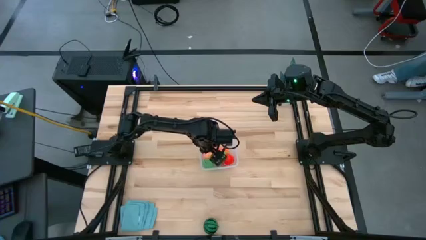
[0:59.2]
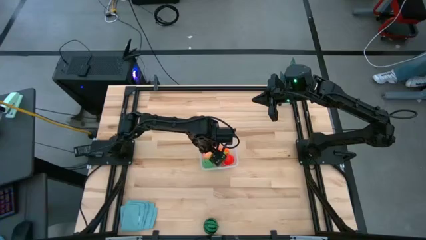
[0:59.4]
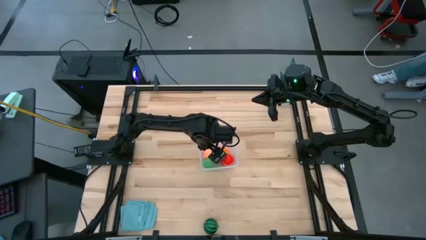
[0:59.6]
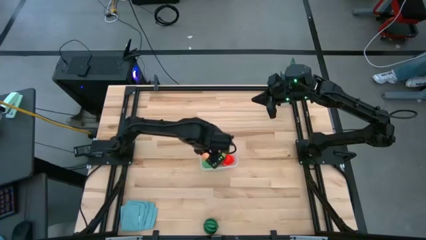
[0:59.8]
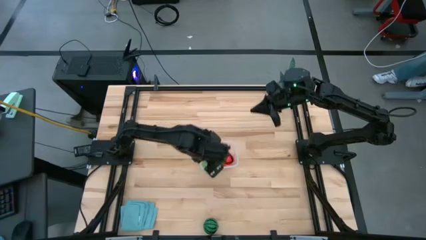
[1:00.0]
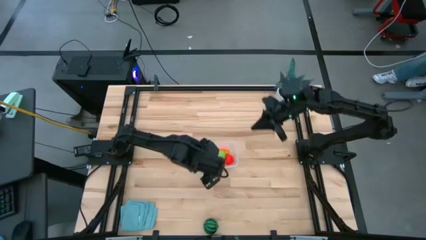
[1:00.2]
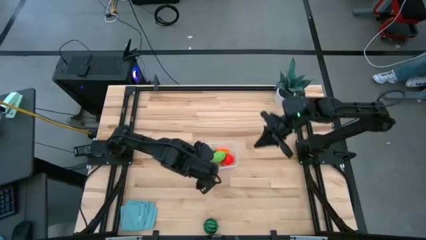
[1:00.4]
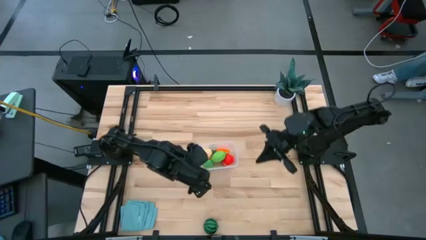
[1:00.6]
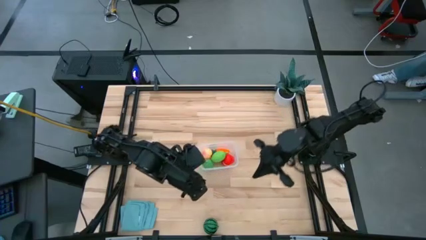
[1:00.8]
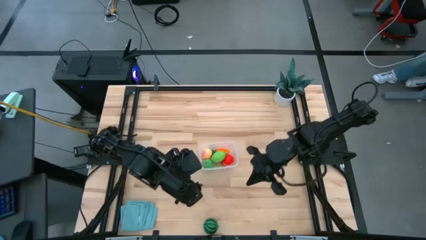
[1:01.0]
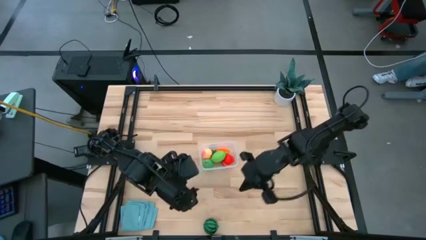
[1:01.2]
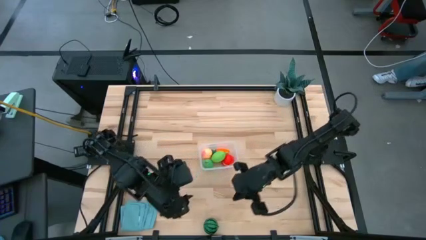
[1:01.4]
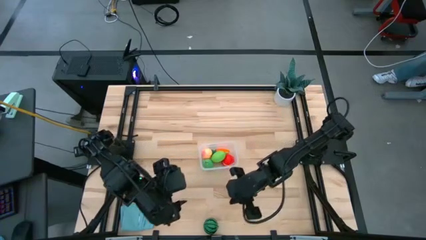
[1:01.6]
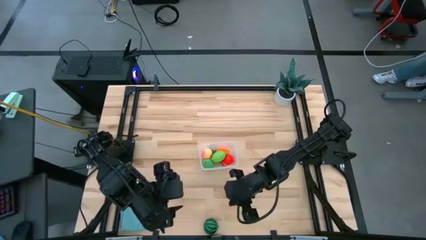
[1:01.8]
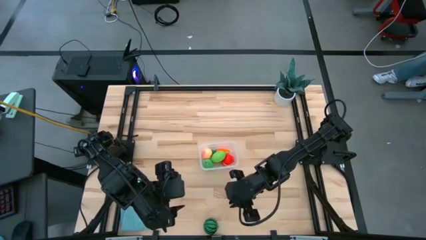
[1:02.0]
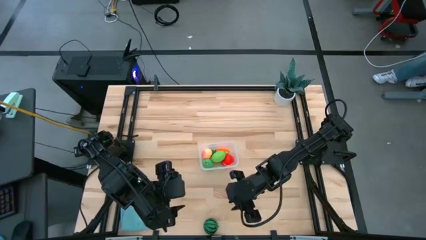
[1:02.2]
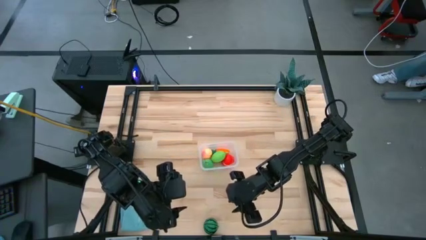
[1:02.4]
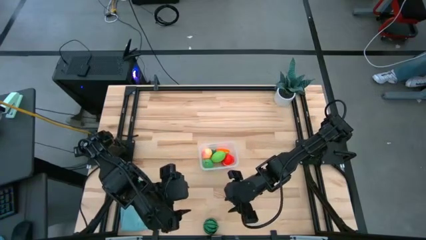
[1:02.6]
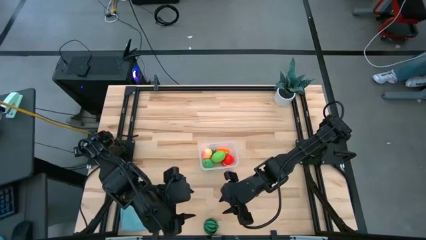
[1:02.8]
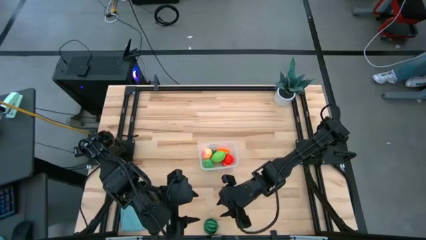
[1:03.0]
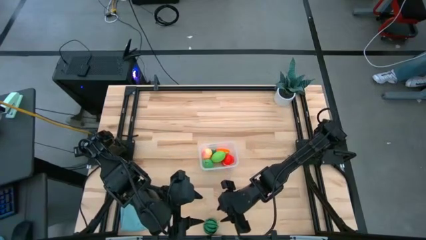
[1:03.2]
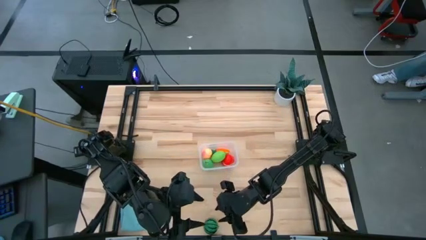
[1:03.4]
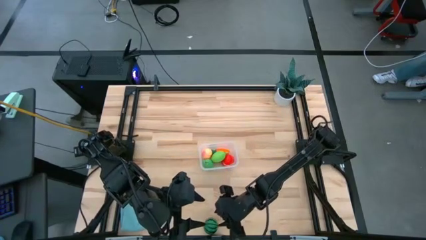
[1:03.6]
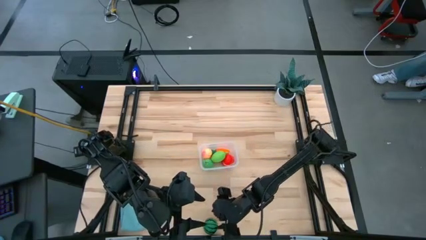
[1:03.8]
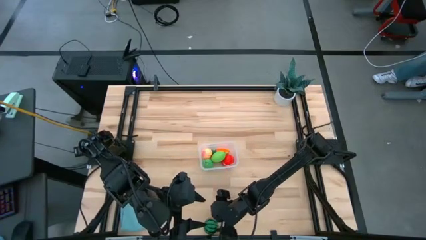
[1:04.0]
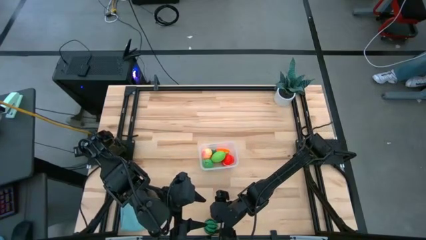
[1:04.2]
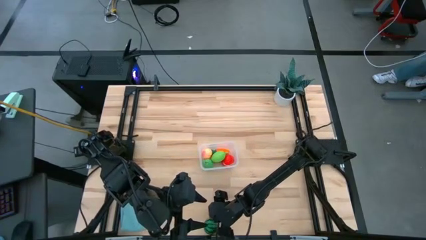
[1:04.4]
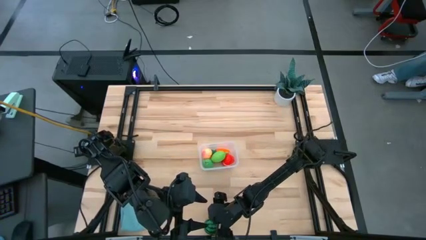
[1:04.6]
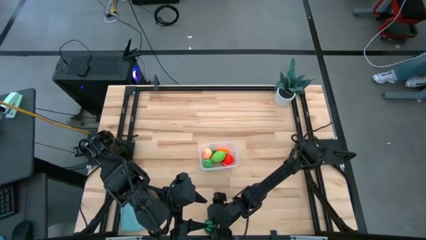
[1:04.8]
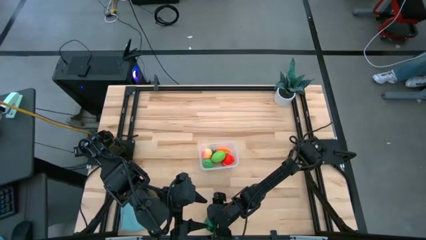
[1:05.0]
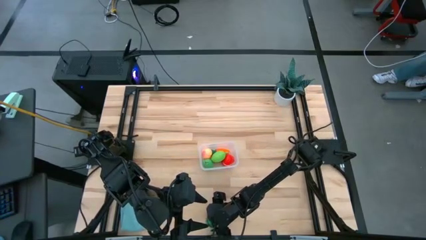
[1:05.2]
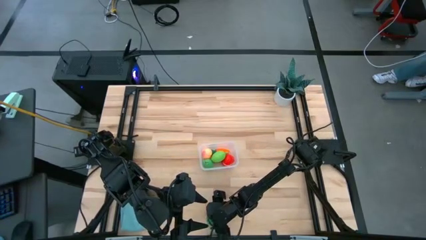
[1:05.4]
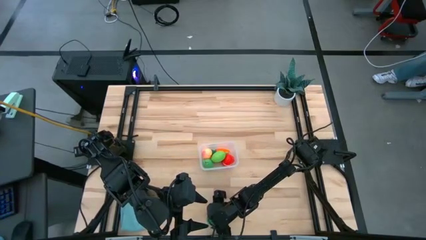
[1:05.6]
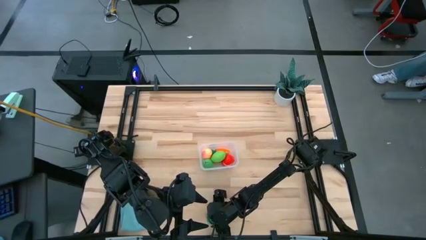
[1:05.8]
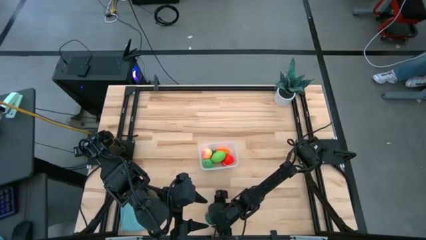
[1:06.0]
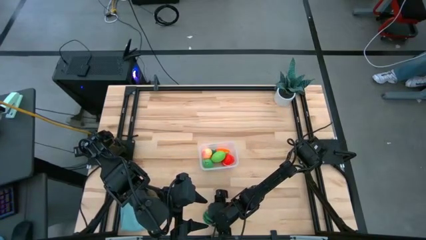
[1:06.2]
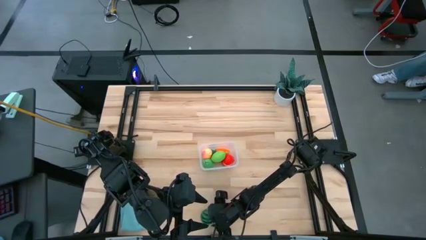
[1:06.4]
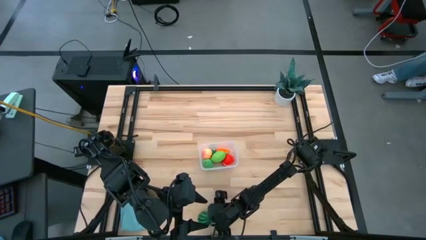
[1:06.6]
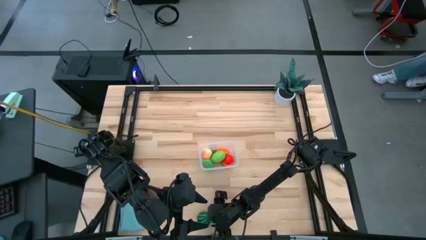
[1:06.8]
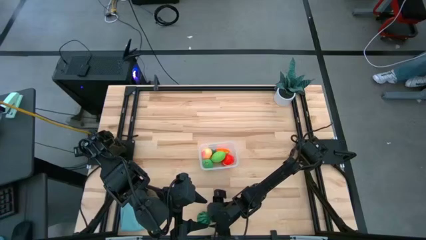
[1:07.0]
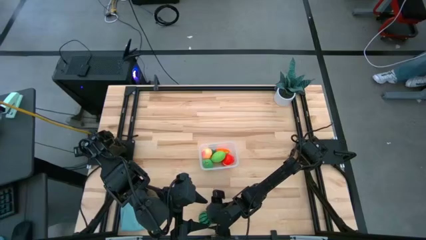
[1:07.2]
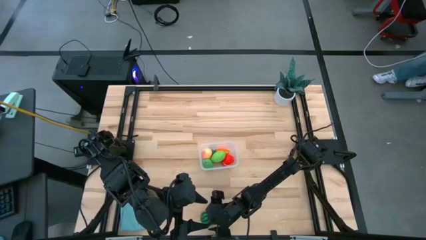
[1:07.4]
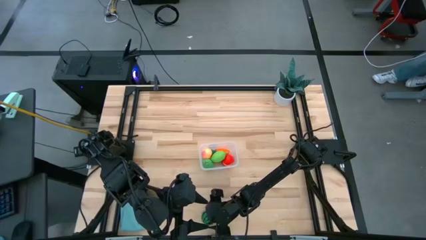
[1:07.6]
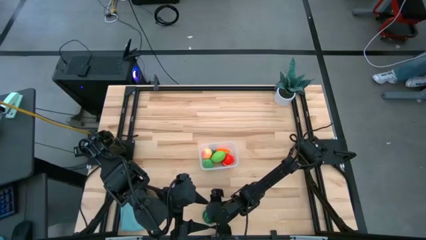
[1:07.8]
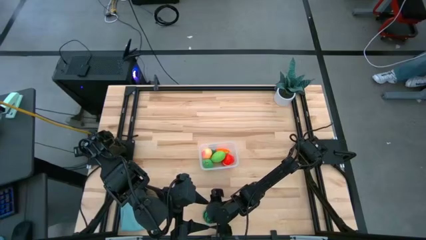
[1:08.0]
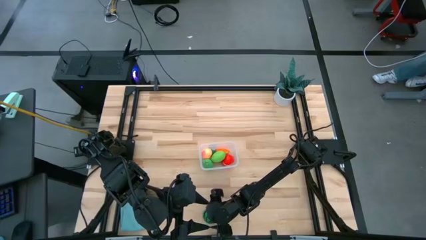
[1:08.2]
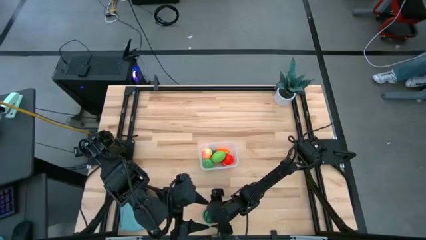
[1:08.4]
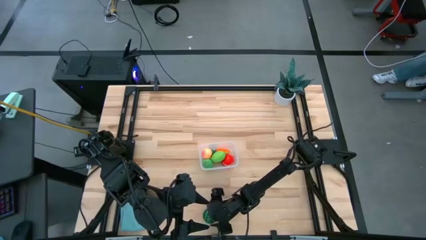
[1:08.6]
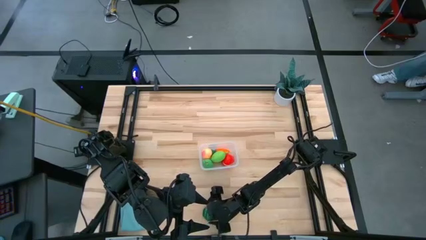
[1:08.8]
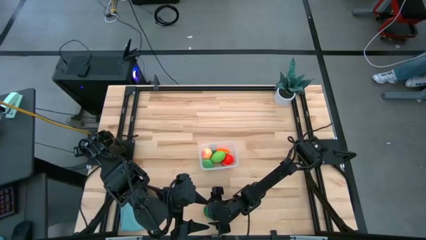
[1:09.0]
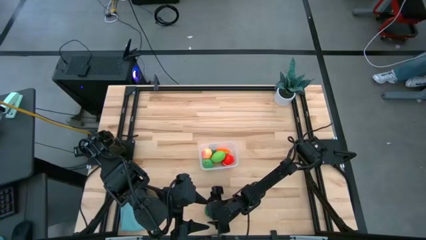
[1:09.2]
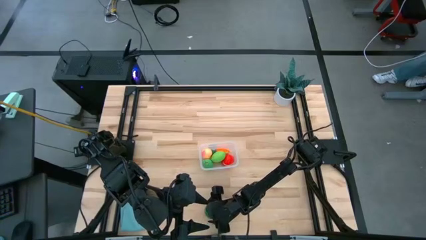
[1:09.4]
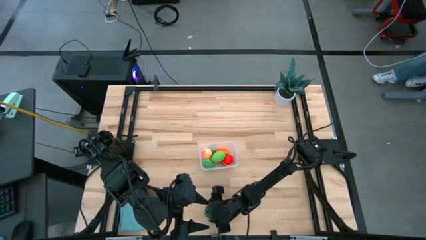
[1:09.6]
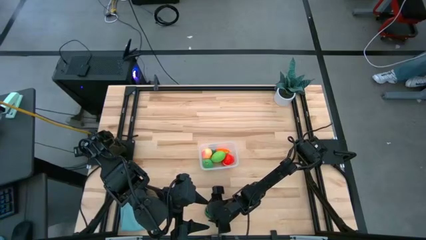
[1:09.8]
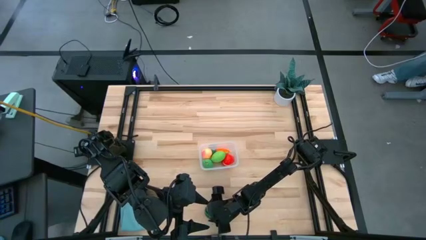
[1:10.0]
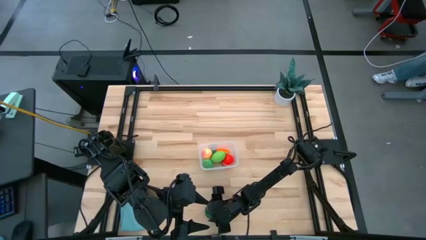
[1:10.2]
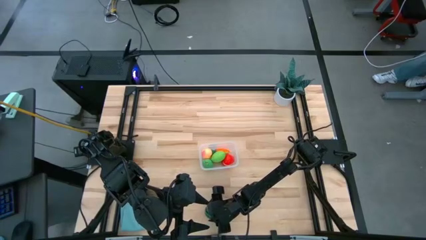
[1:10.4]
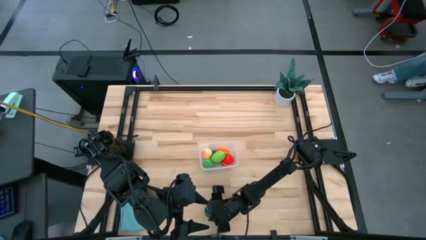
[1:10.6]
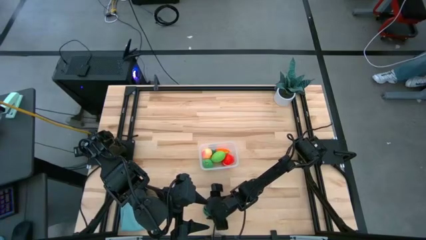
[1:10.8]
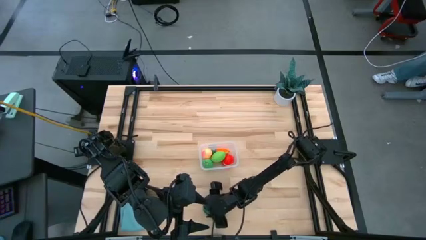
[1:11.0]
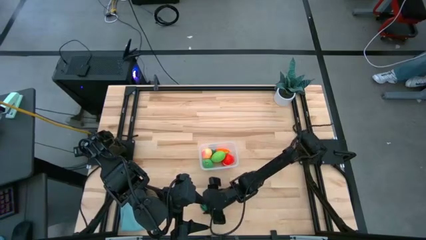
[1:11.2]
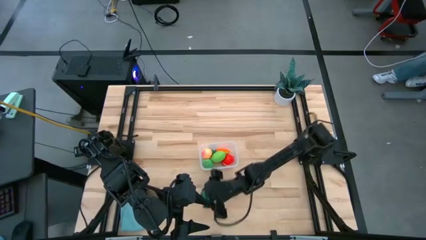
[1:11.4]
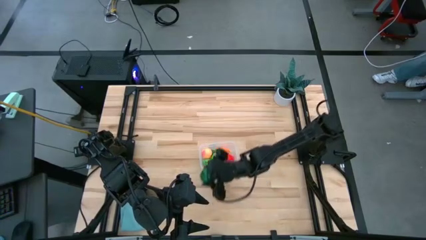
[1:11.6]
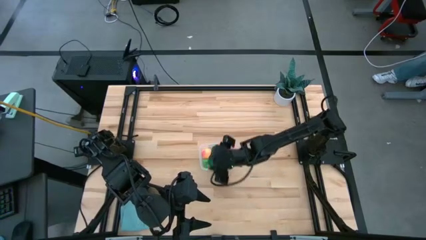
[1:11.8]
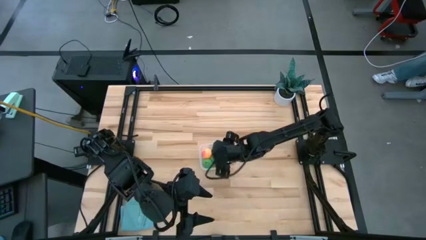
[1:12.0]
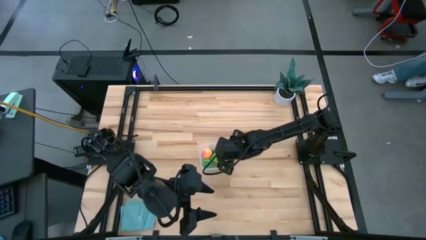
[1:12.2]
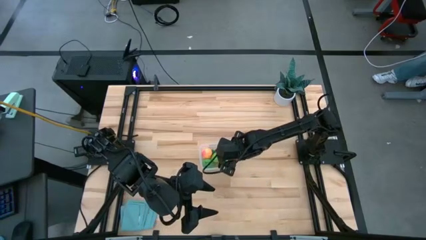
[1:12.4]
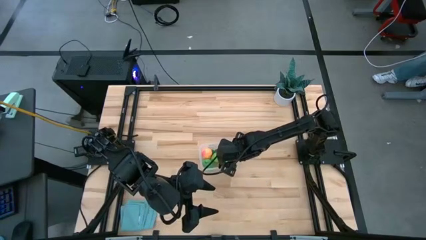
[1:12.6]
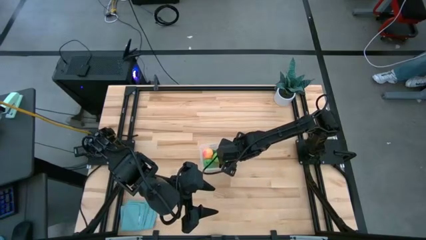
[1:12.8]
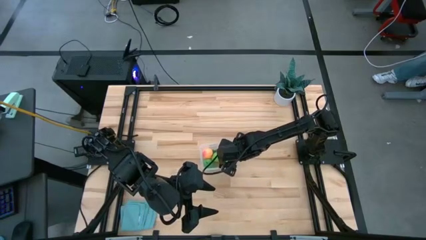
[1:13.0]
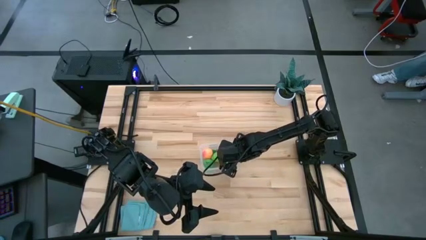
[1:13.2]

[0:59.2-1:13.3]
Task: Pick and placing Produce into tupperware
Put the green watermelon into the transparent bin

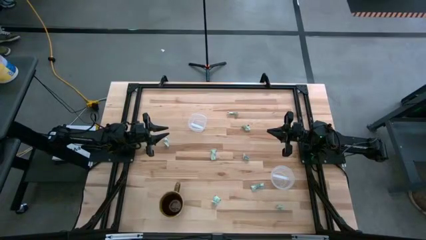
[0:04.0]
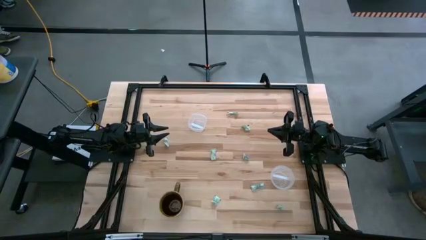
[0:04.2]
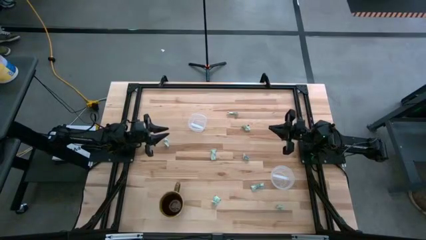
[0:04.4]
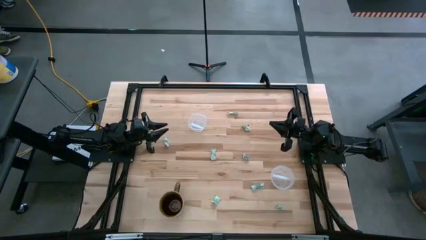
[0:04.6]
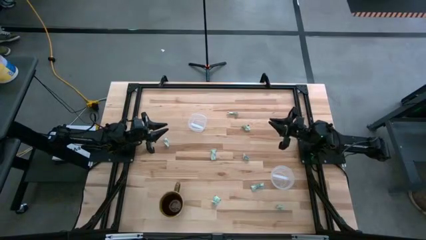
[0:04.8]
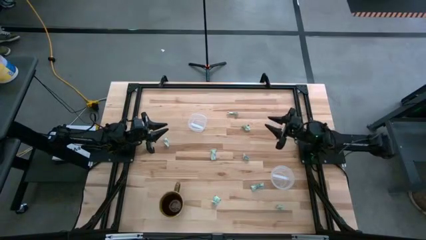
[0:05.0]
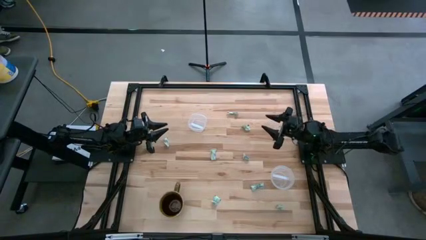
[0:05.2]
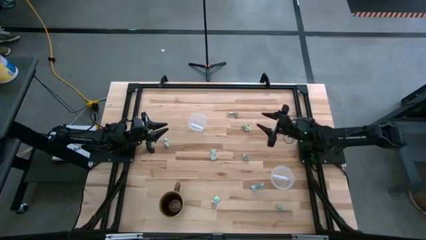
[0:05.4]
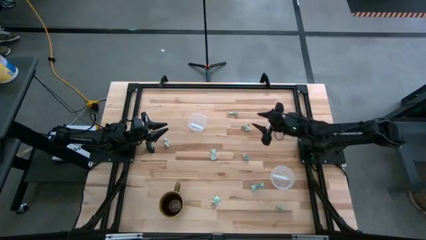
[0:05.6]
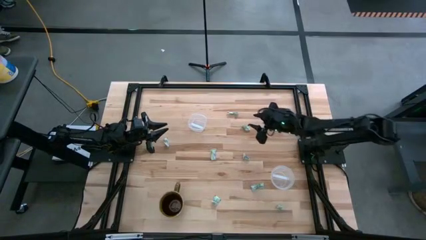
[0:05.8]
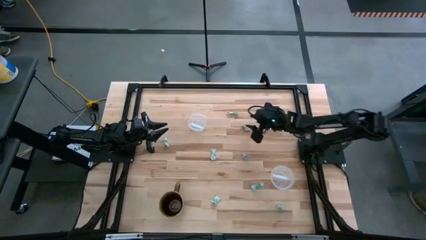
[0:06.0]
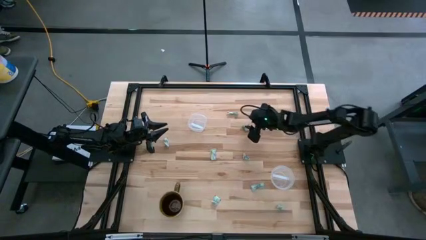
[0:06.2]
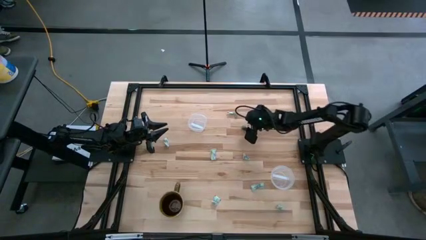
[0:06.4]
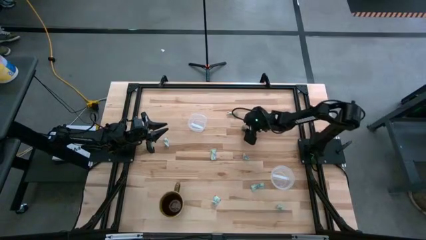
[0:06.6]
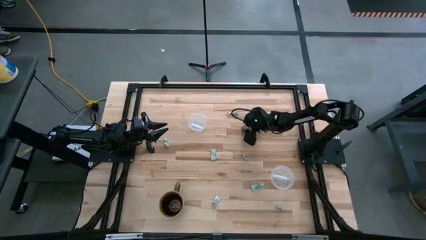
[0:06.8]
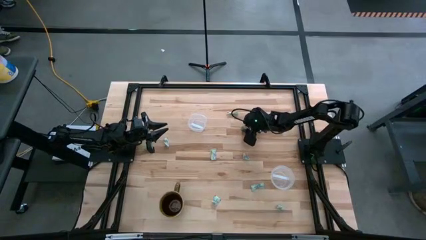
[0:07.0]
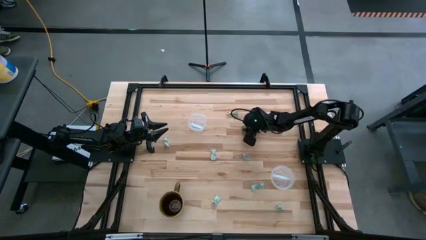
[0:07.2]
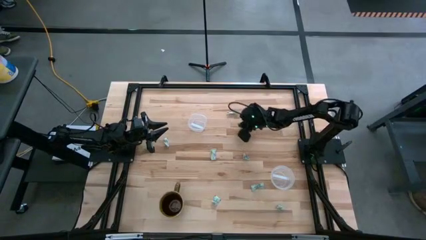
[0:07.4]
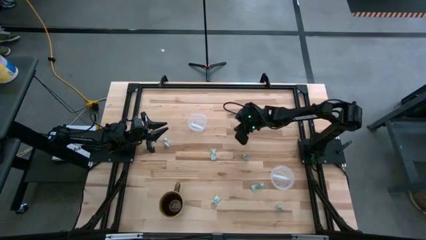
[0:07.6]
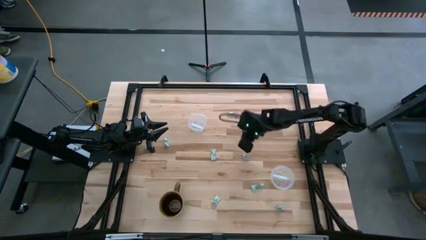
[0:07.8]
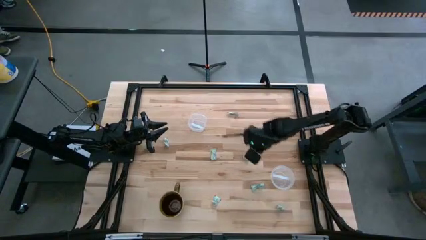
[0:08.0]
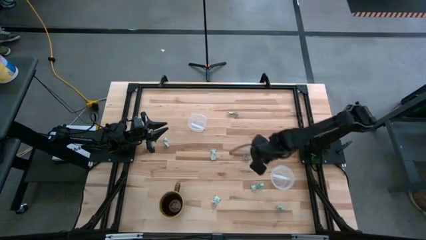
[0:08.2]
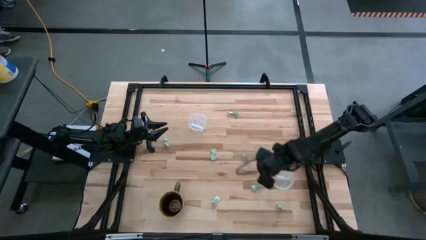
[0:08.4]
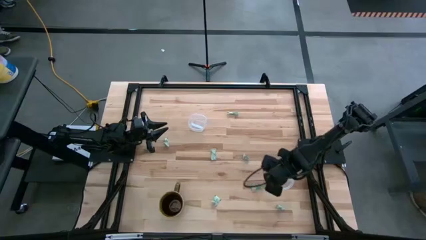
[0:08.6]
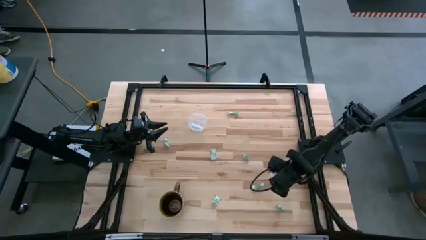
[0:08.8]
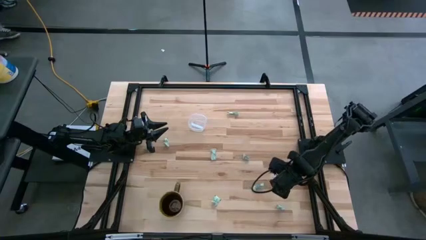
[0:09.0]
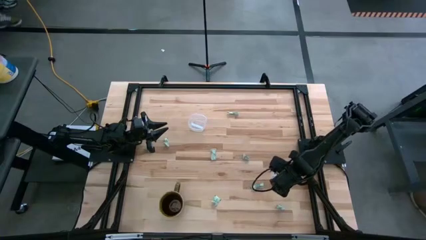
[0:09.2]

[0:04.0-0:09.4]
Task: Pick and place items into bin
Put the white stevia packet into the bottom transparent bin
